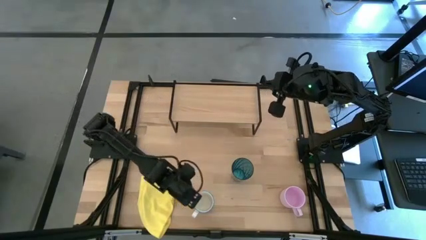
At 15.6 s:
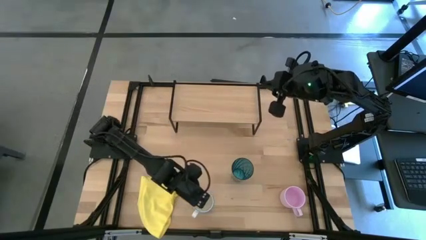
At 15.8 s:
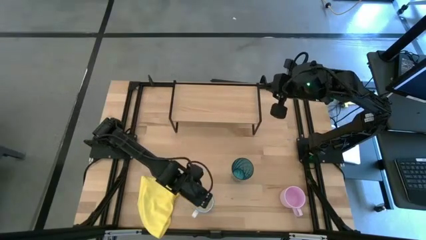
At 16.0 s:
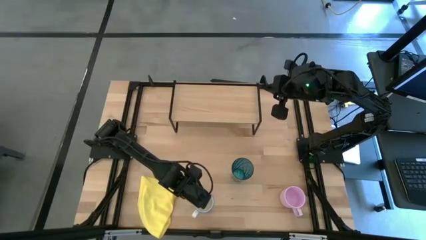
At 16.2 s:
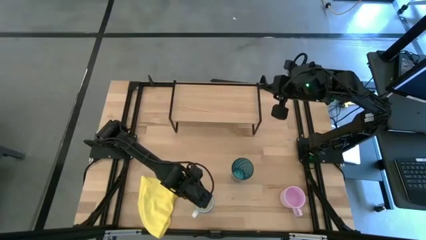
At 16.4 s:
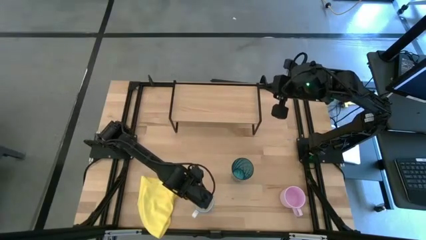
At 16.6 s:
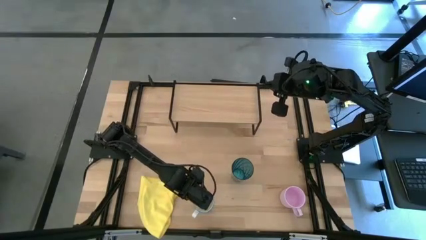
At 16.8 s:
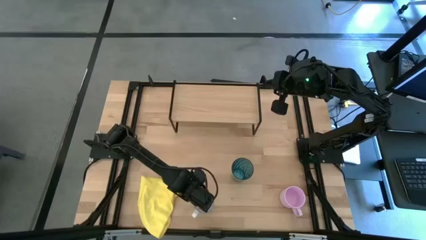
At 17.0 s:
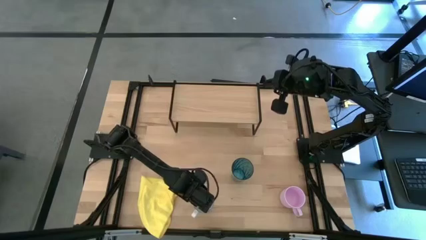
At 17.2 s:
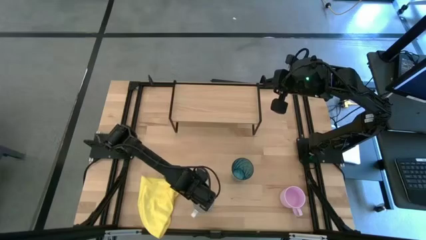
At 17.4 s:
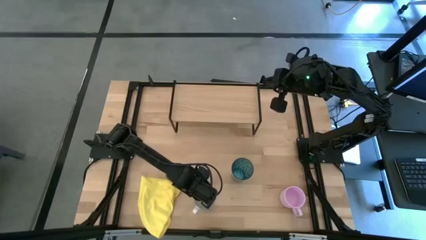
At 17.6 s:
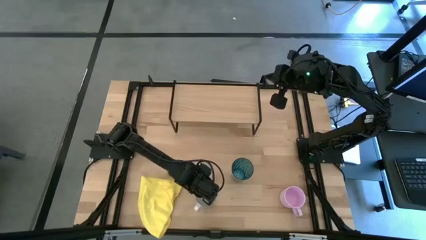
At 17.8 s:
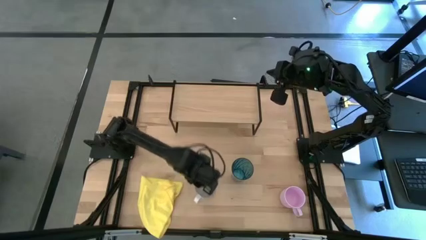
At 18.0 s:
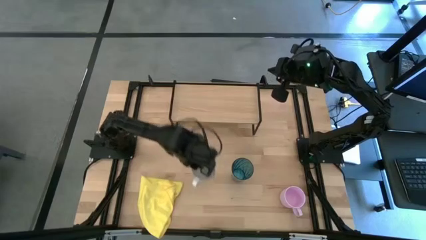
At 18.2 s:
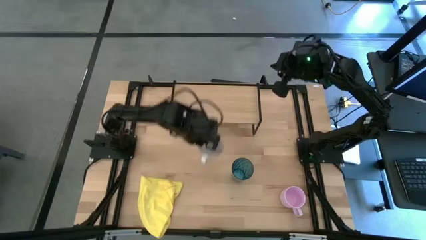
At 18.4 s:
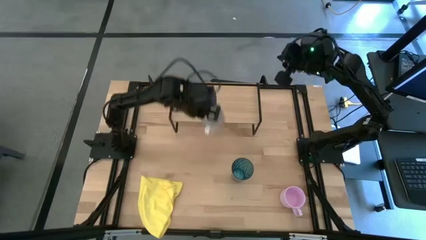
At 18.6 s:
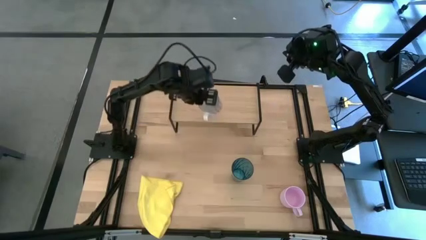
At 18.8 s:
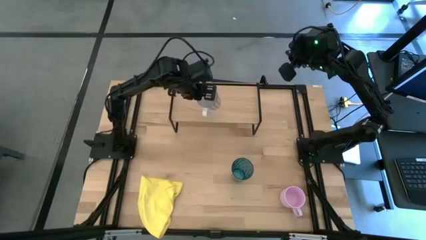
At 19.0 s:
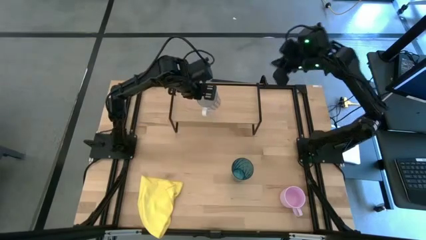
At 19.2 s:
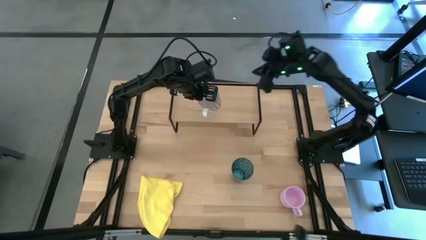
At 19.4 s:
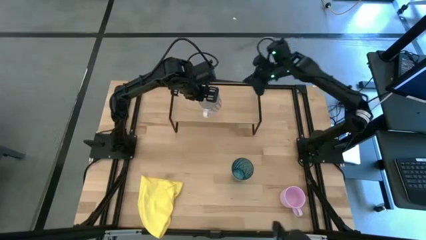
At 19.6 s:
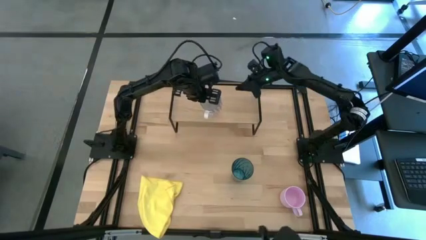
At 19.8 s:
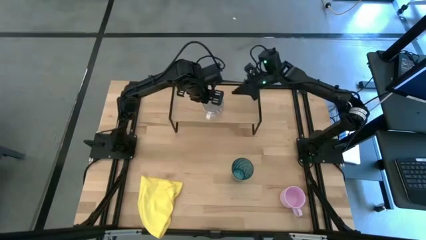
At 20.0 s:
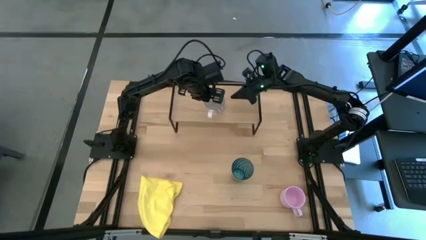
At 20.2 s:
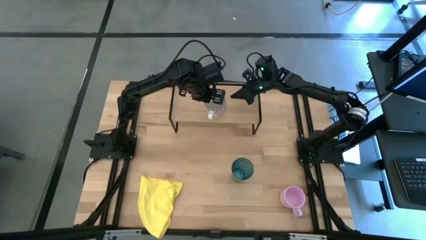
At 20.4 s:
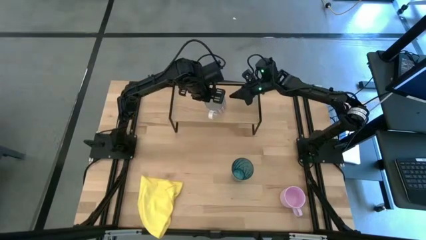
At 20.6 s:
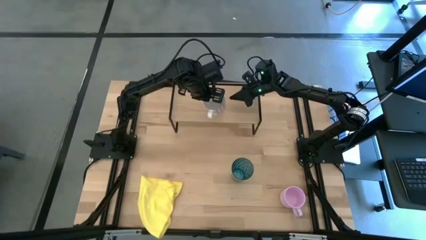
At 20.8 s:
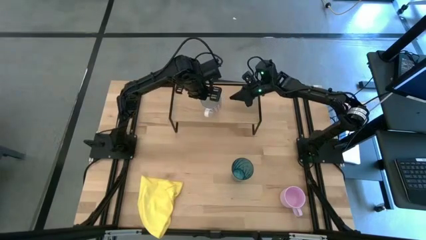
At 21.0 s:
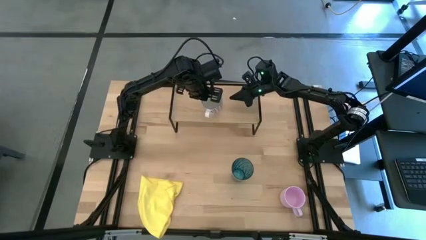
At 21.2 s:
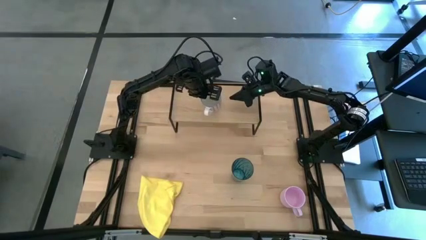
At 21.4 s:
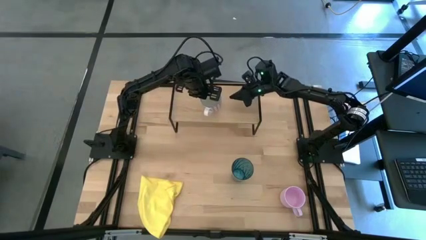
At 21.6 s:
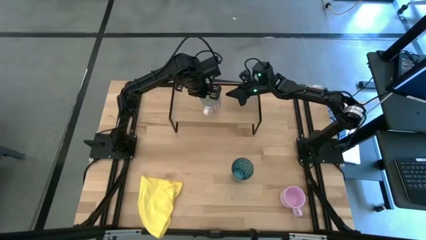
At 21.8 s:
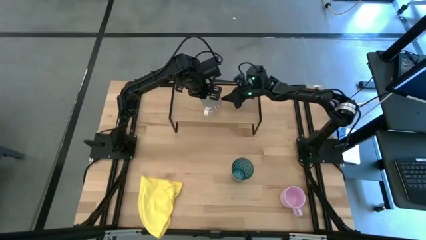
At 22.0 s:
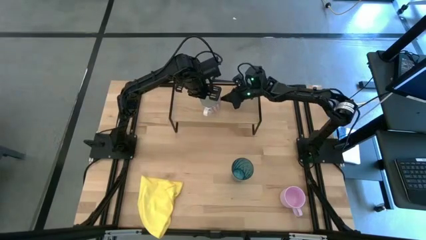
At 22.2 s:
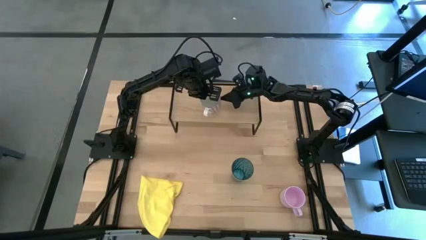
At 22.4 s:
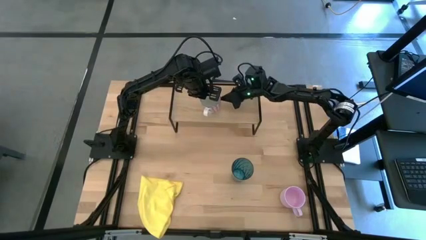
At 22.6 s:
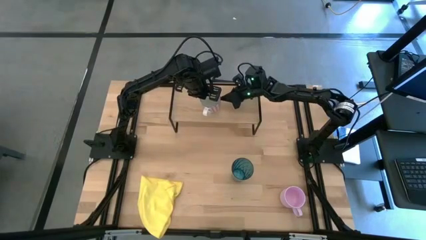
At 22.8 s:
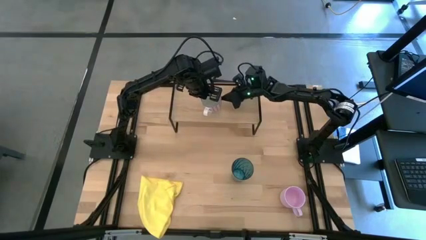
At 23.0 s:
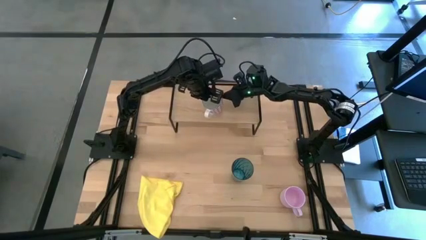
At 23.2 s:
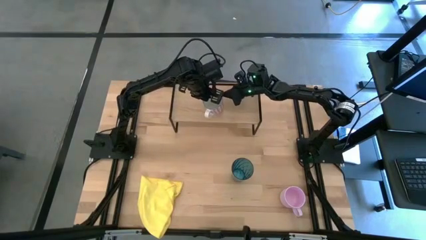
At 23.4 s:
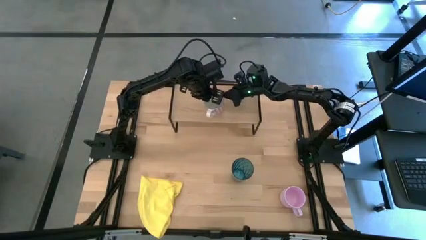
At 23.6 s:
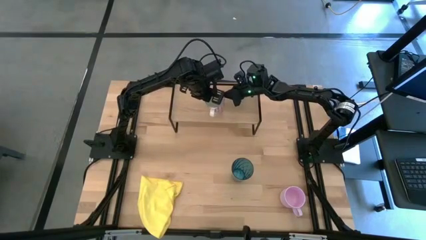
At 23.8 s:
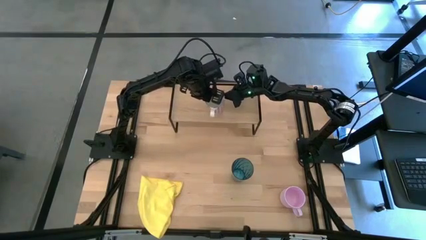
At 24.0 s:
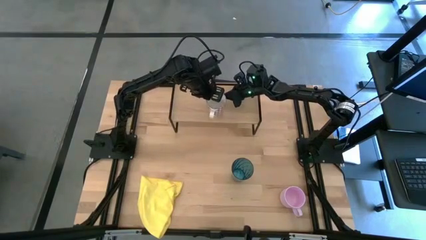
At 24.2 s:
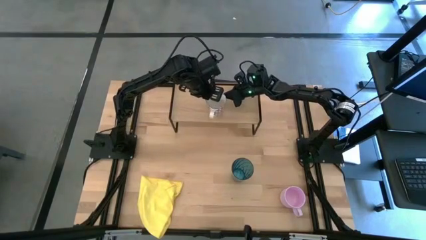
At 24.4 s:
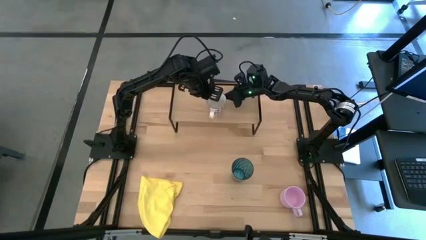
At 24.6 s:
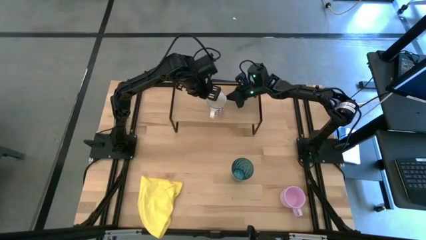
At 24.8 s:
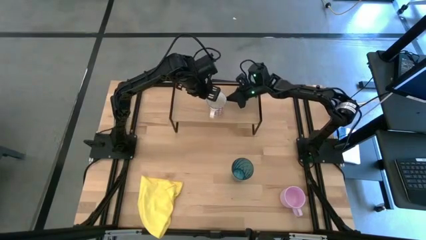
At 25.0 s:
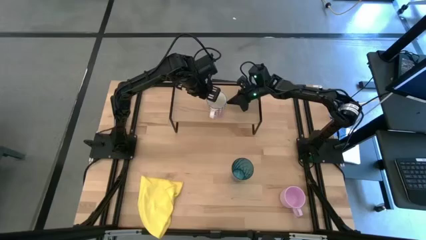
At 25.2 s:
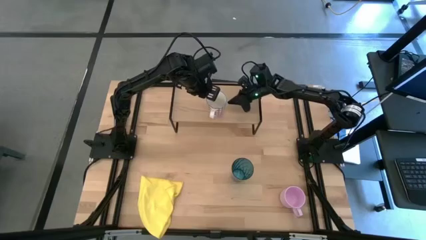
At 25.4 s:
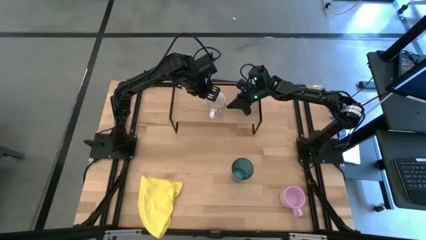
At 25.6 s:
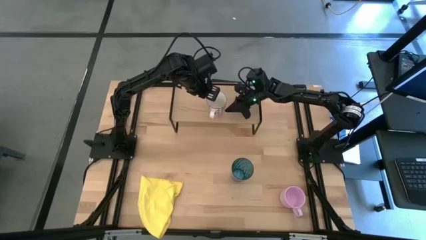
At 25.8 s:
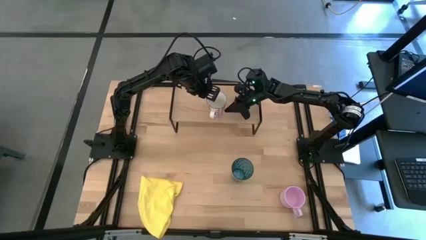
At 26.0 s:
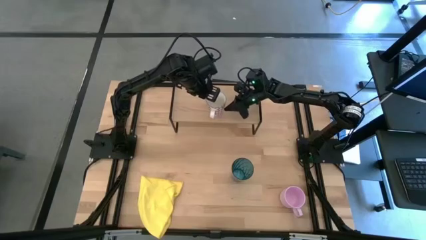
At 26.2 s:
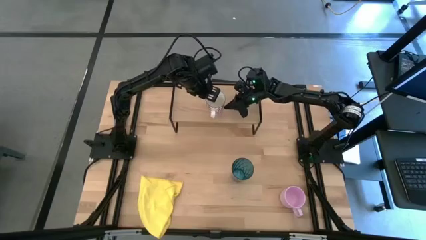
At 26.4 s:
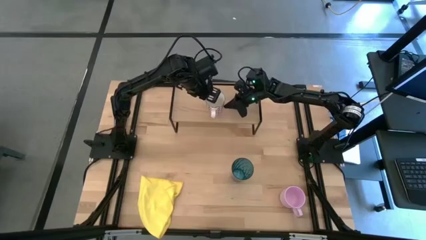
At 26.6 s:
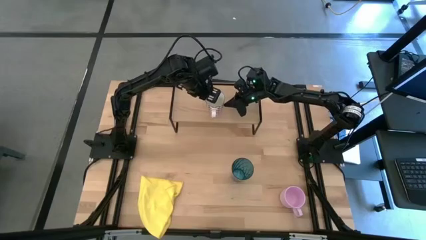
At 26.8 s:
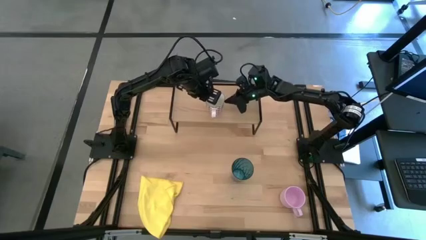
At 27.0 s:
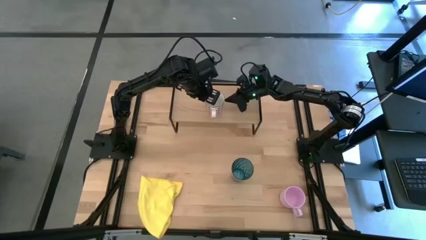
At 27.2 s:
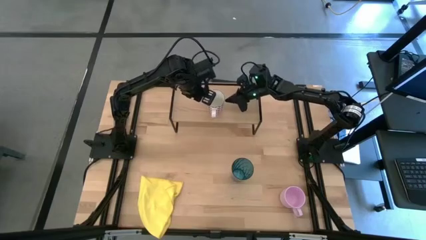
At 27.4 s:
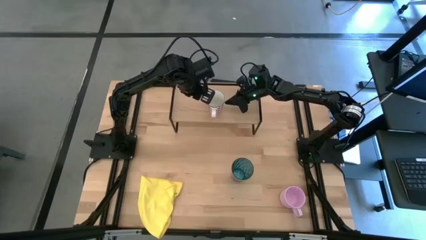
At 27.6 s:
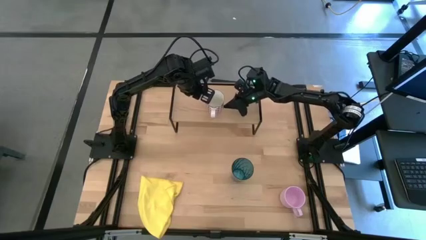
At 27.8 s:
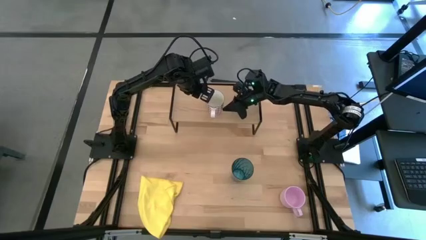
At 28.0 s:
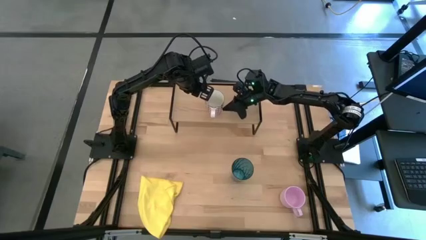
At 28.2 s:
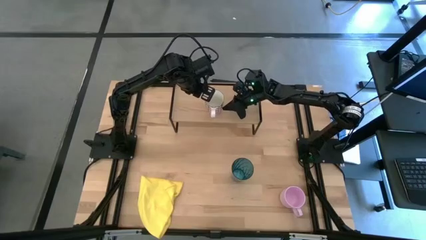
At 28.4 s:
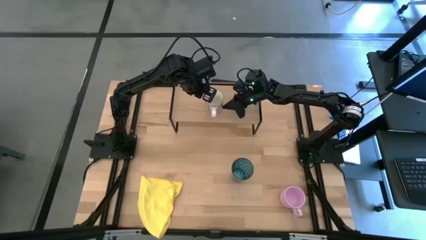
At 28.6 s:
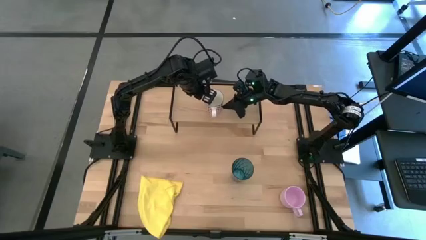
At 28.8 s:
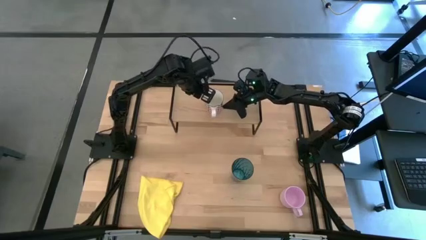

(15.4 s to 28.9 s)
Task: Stack small to large cups/mugs on shelf
Put the white/red mug on the shelf
